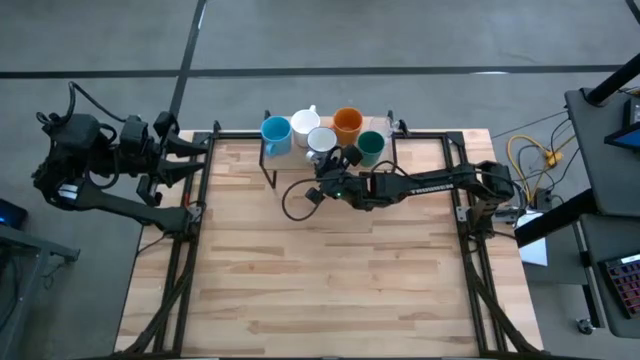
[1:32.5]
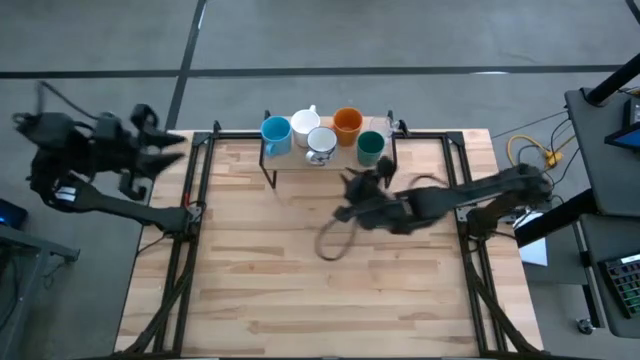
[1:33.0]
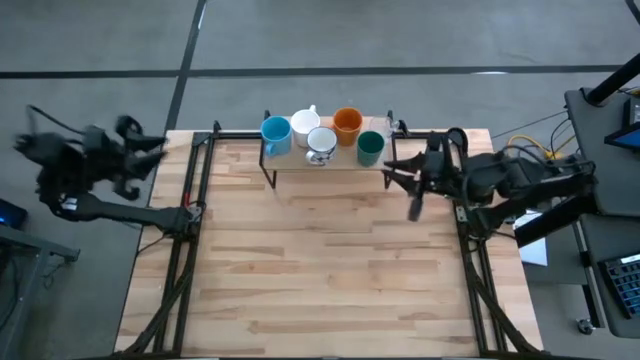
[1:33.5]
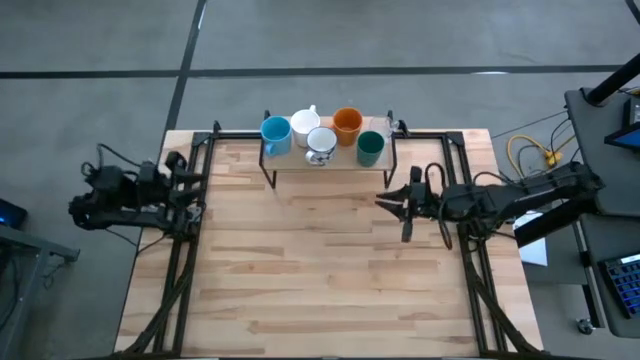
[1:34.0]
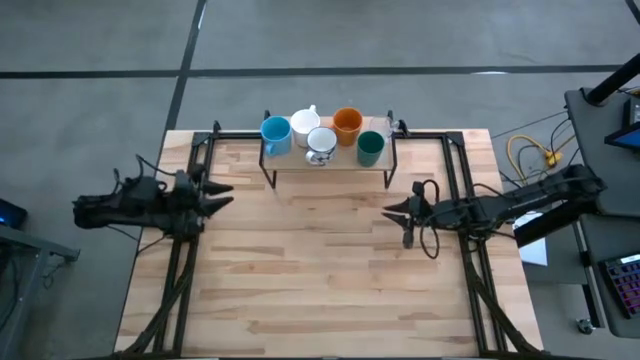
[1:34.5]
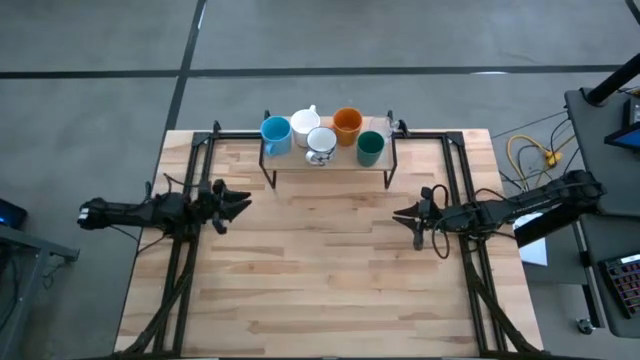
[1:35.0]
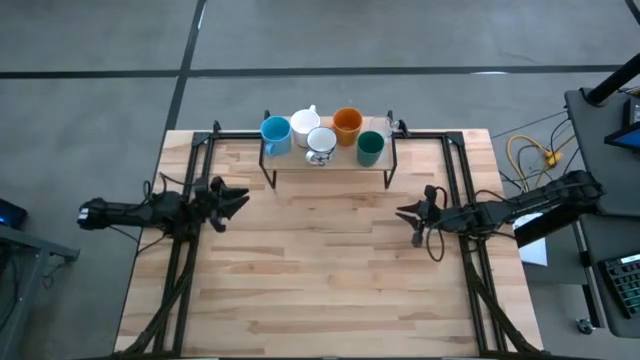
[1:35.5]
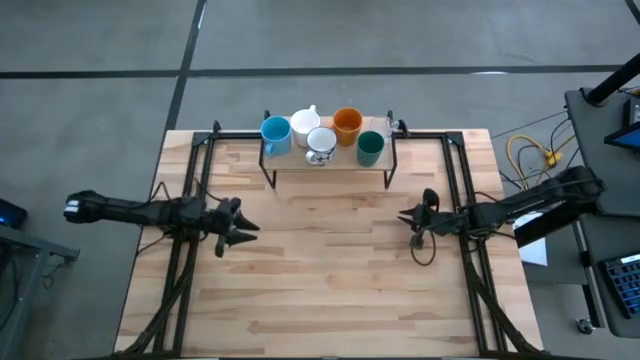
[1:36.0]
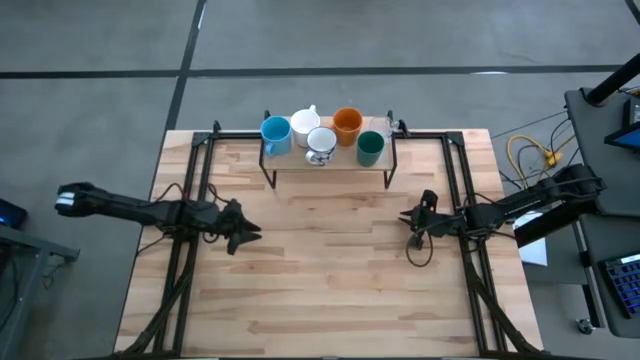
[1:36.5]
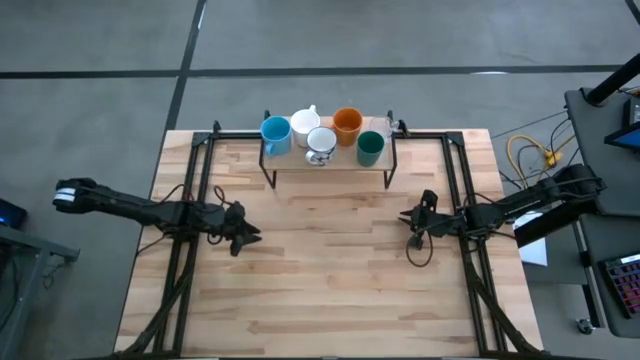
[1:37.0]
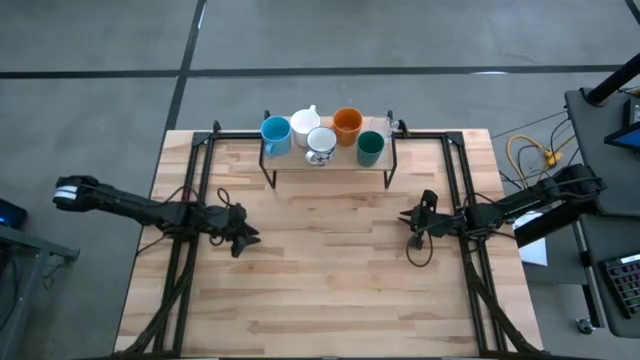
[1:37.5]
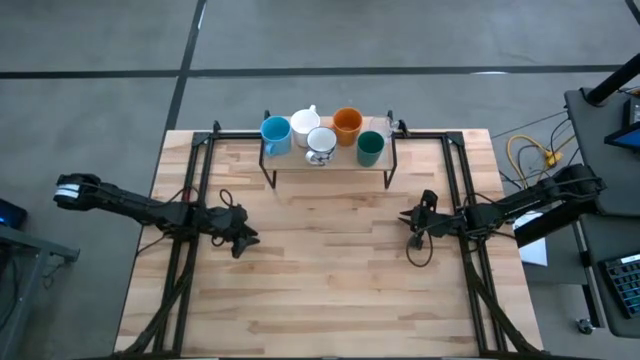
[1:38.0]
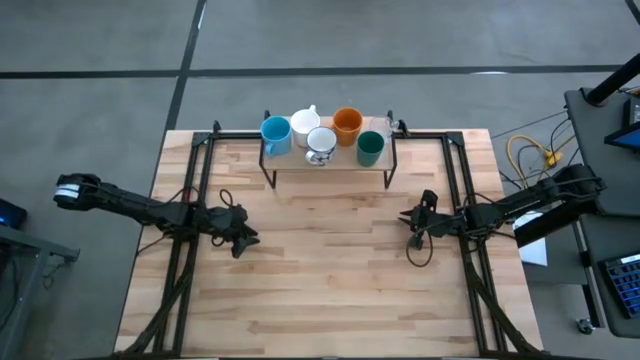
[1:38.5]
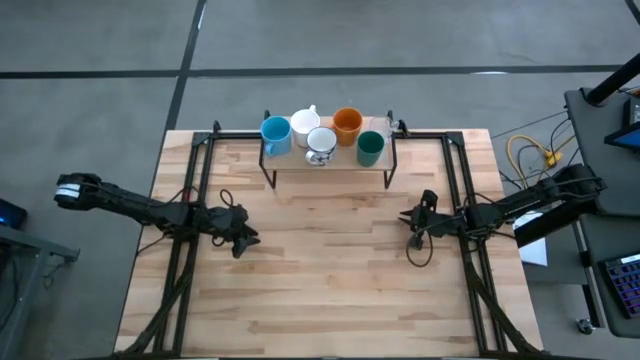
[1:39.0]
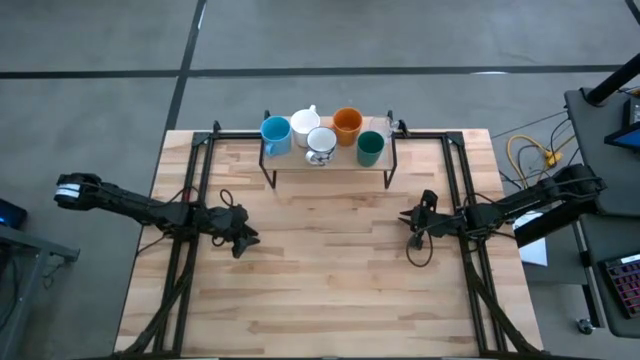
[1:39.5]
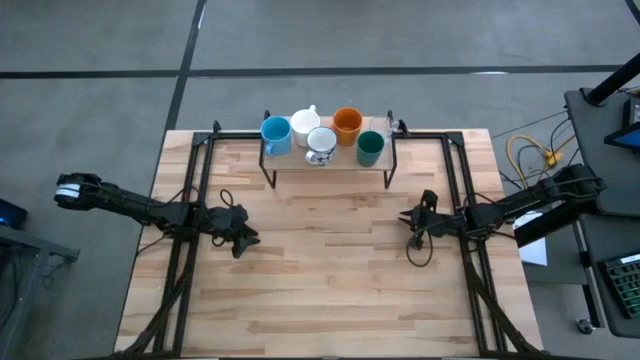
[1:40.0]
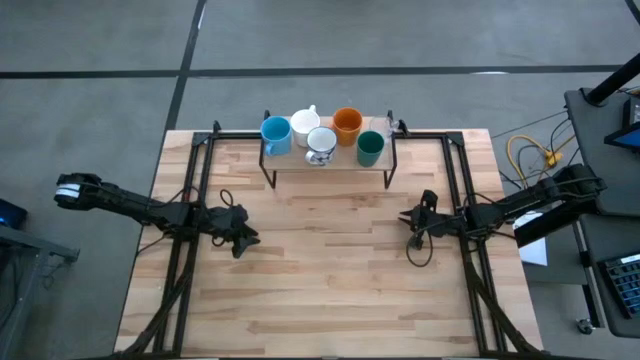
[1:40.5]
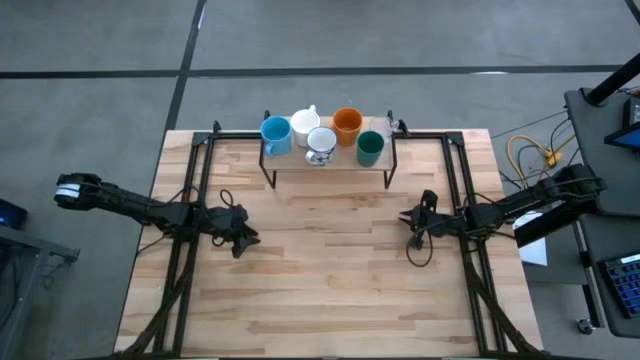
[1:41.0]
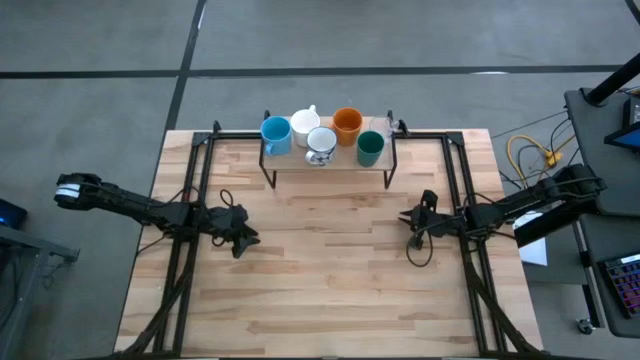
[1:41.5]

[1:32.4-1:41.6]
Task: Stack small to large cups/mugs on shelf
Return to Home Position

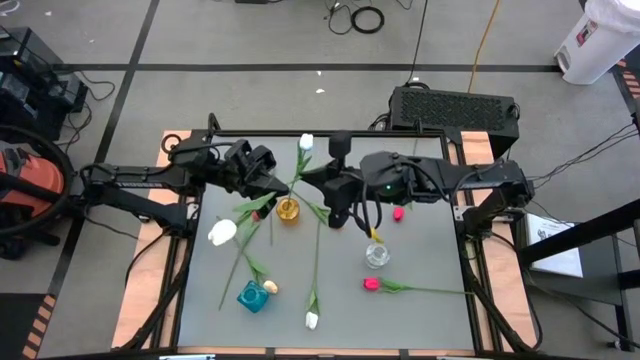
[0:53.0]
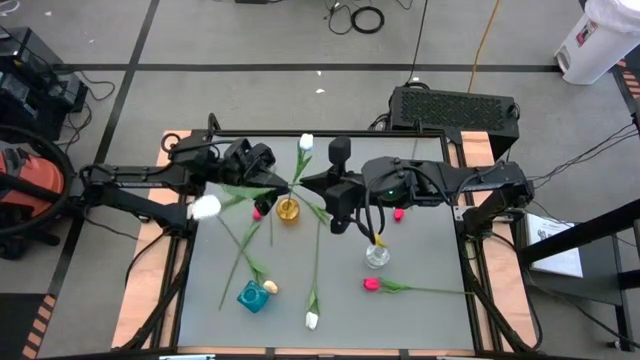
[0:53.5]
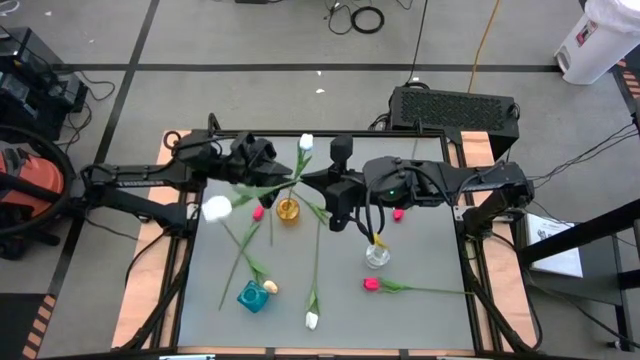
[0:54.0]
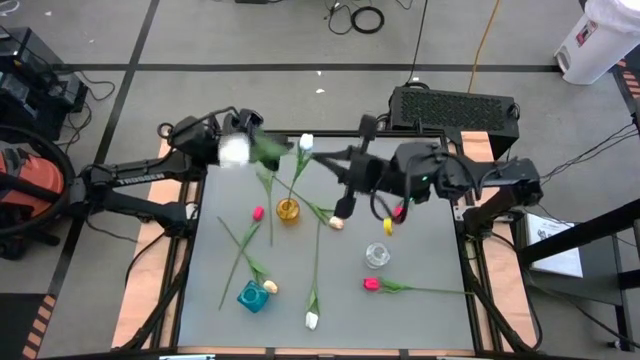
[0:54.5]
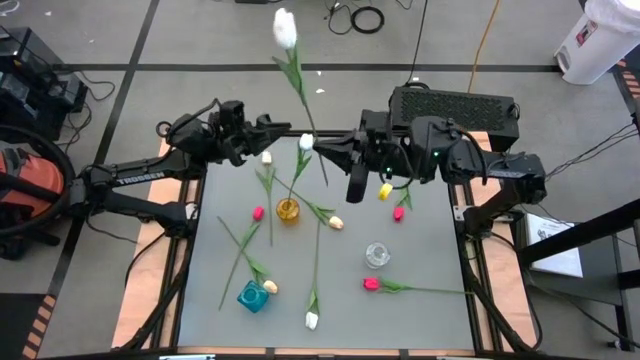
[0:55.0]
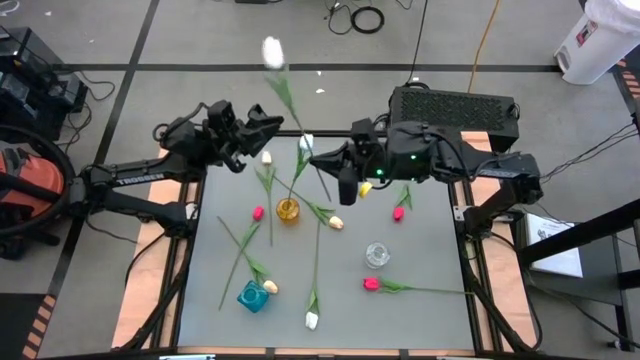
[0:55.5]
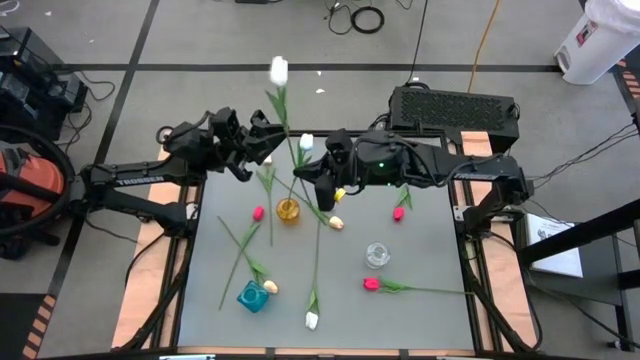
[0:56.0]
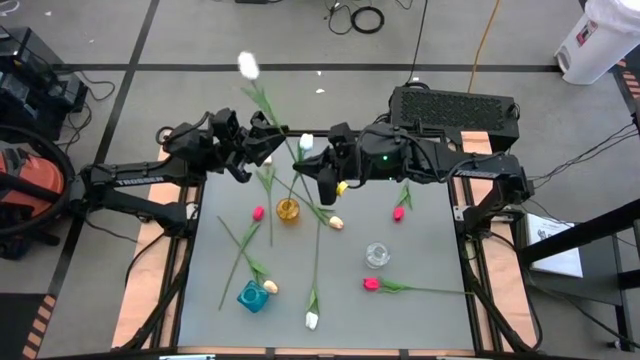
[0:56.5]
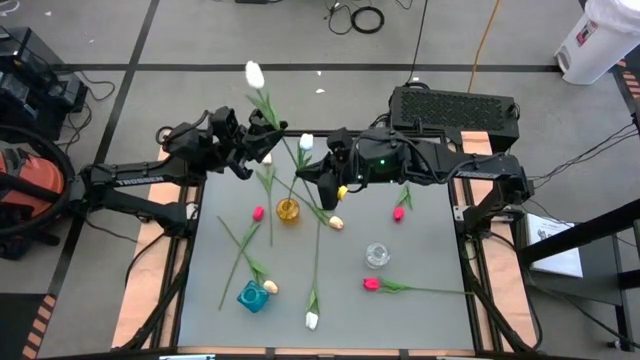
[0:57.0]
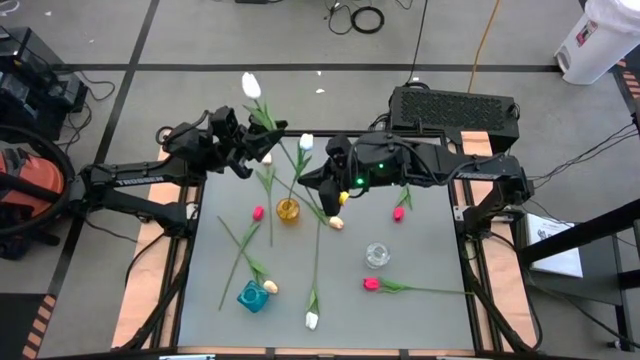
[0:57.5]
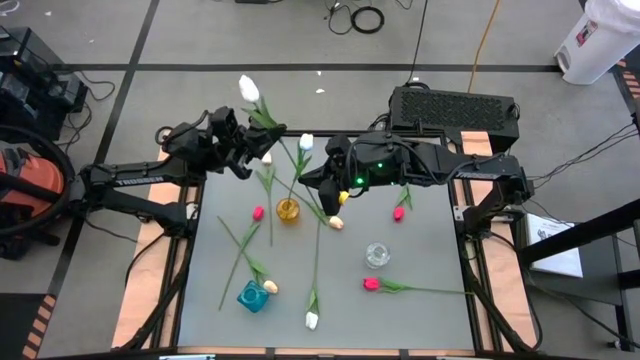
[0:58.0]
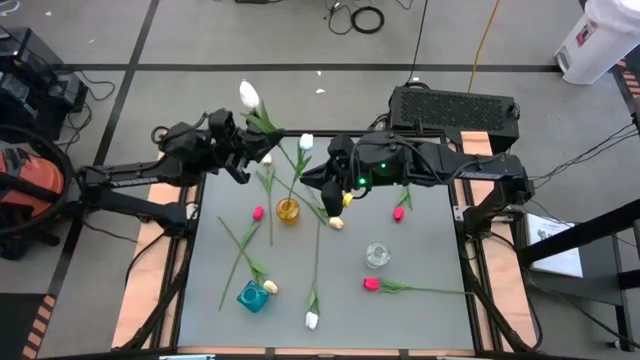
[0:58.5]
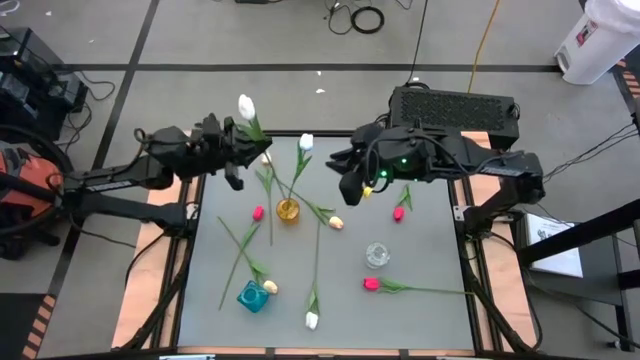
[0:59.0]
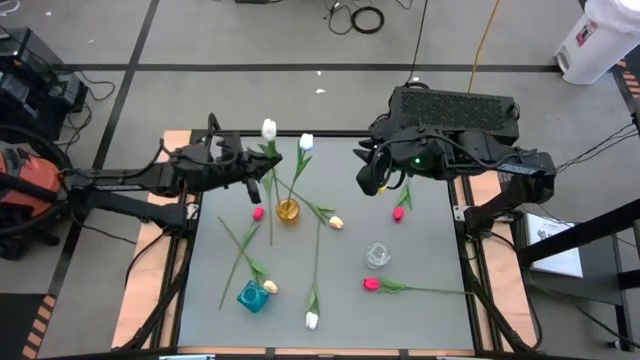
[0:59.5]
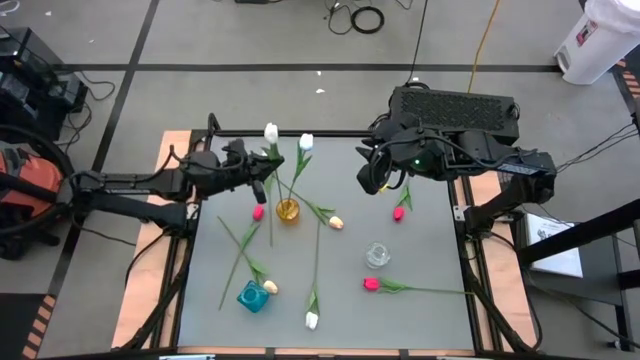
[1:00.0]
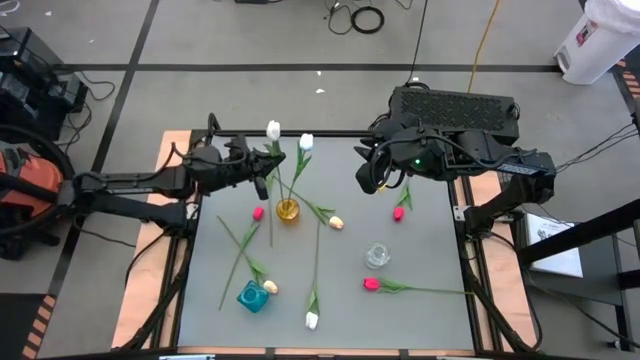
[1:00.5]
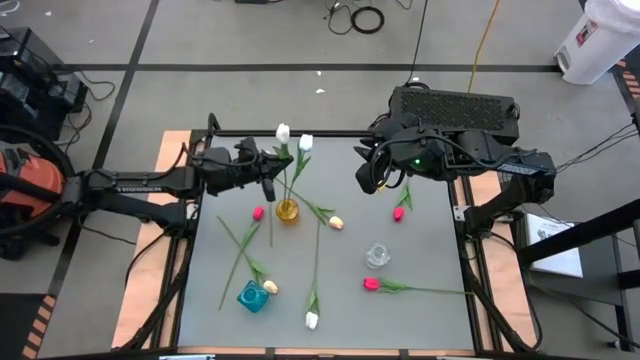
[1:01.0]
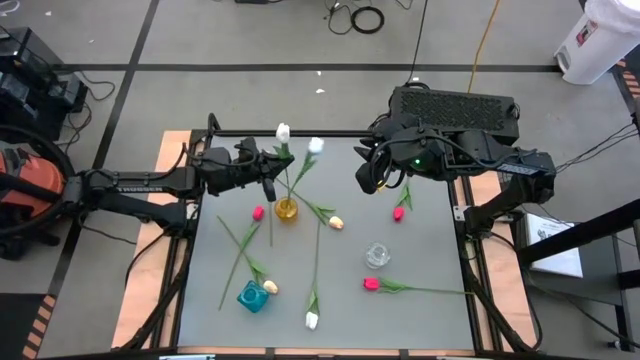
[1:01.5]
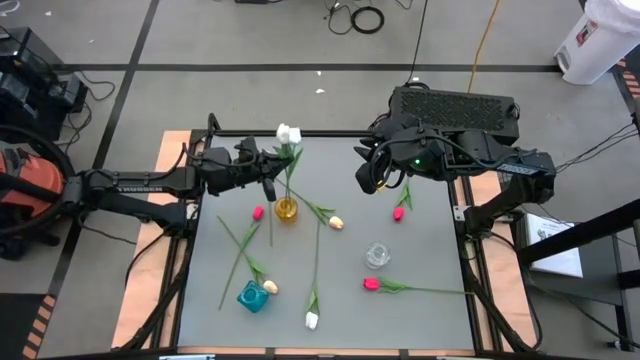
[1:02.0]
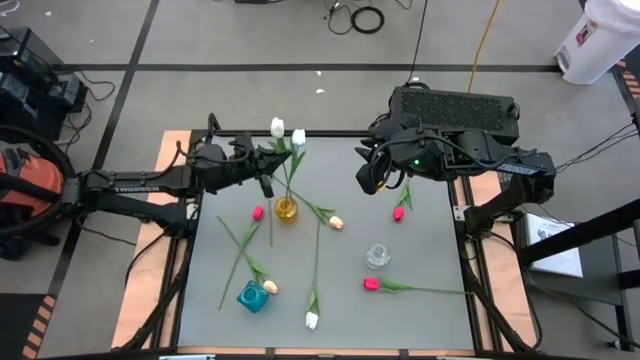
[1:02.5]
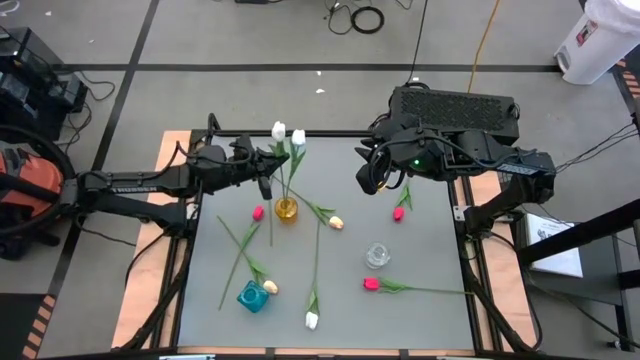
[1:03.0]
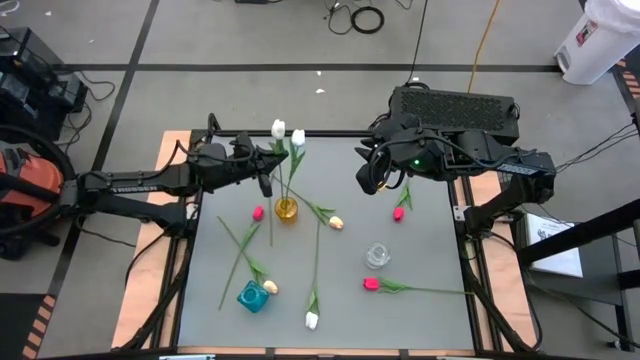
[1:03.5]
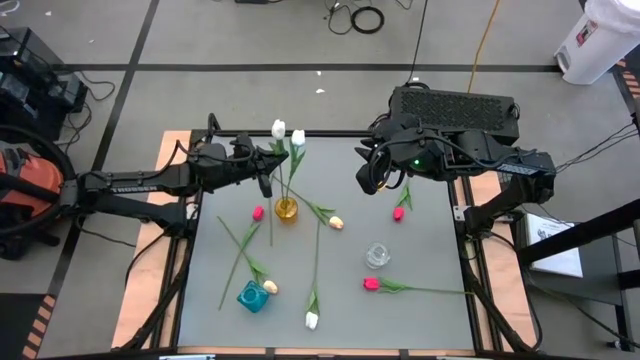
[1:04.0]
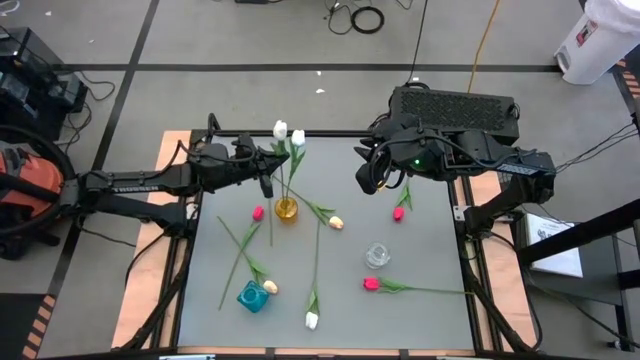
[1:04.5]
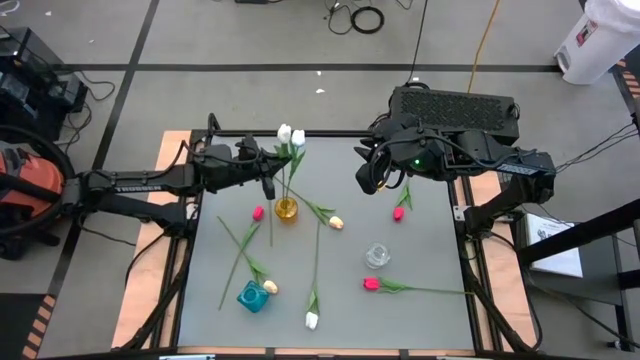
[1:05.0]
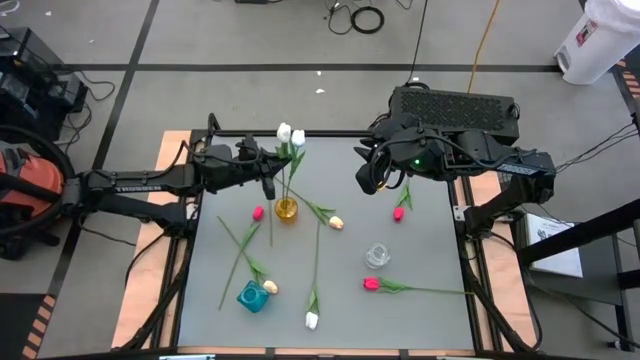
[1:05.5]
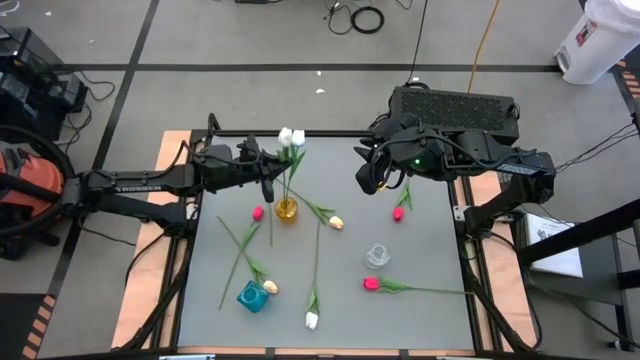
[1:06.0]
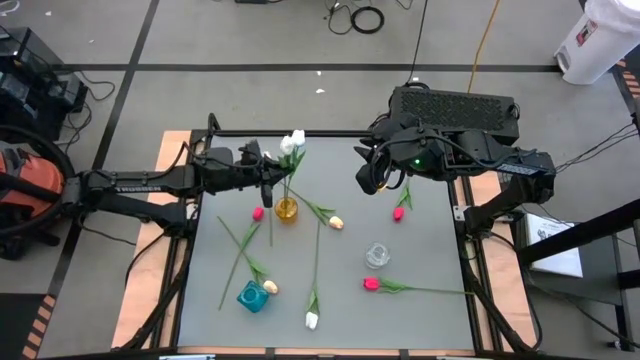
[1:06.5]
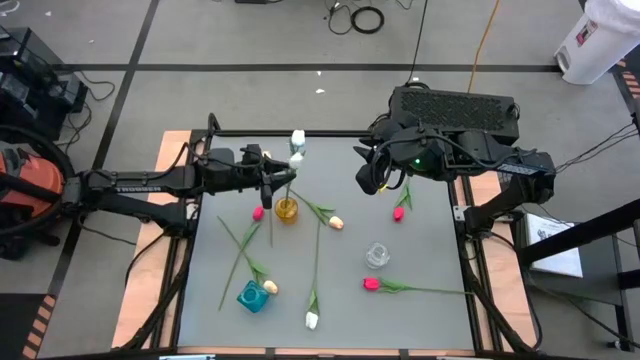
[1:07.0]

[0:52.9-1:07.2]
Task: Sort flowers into vase by color
Put the top white tulip into the yellow vase
